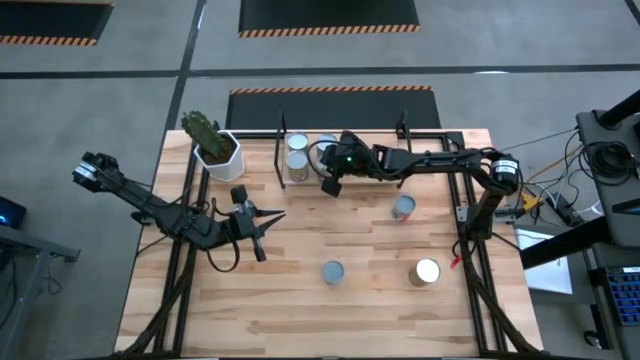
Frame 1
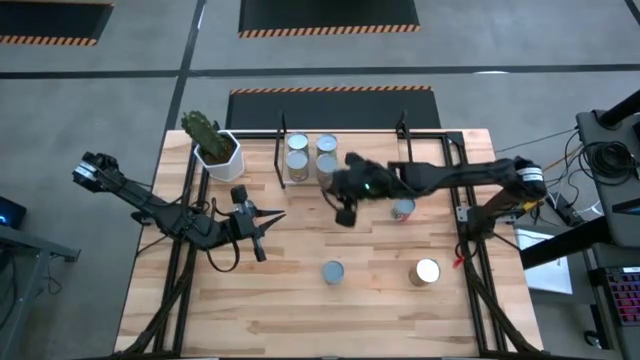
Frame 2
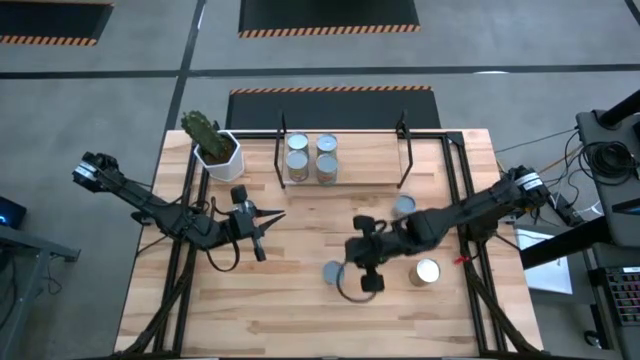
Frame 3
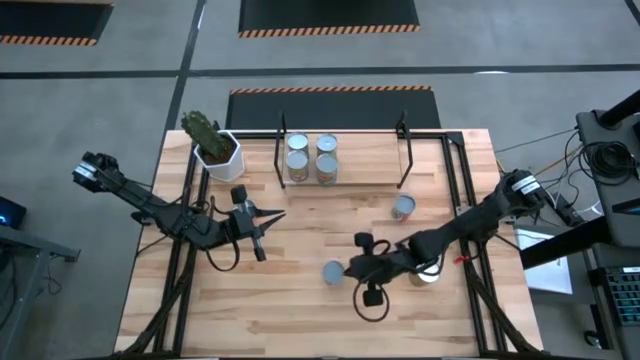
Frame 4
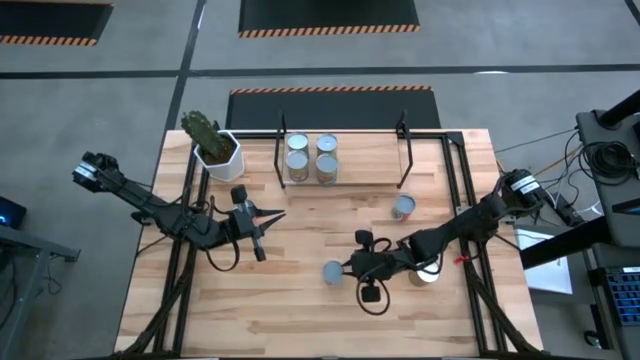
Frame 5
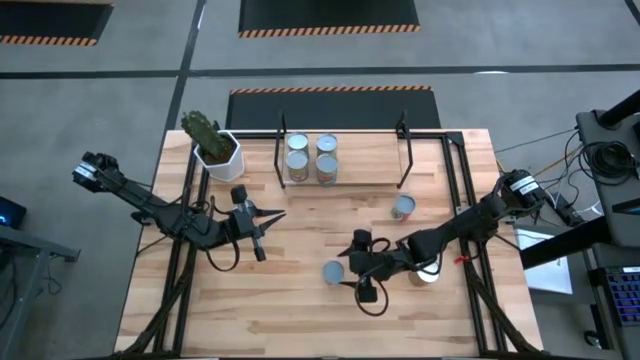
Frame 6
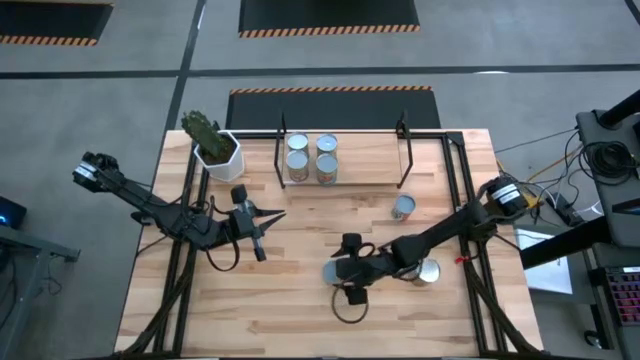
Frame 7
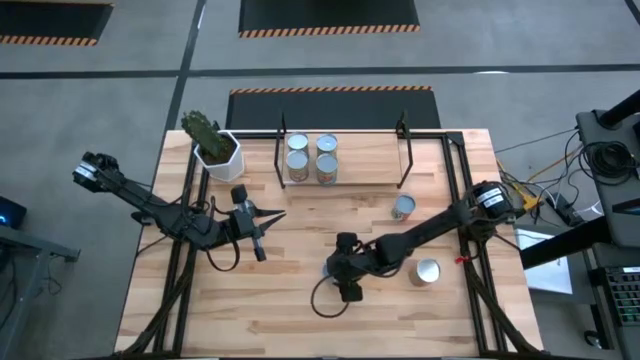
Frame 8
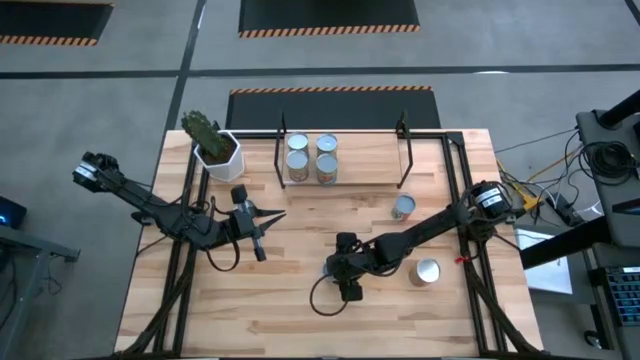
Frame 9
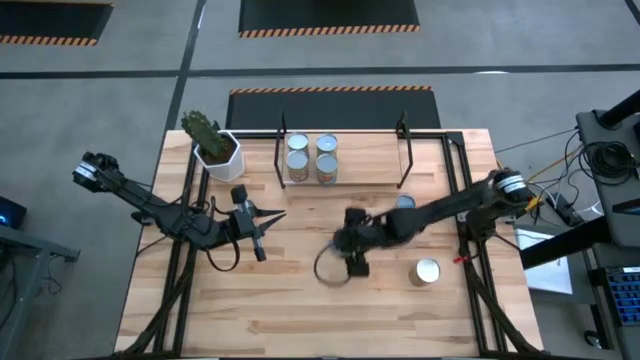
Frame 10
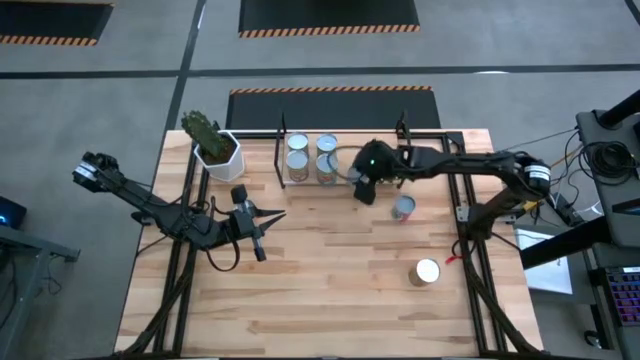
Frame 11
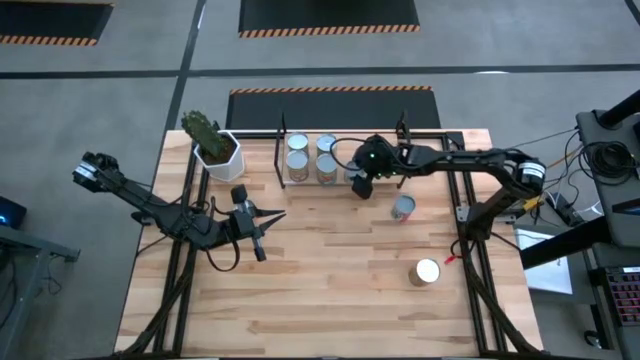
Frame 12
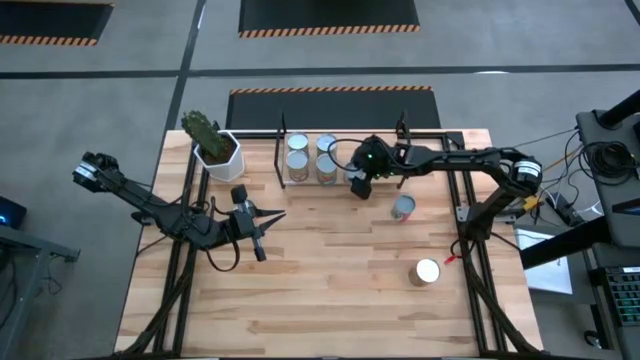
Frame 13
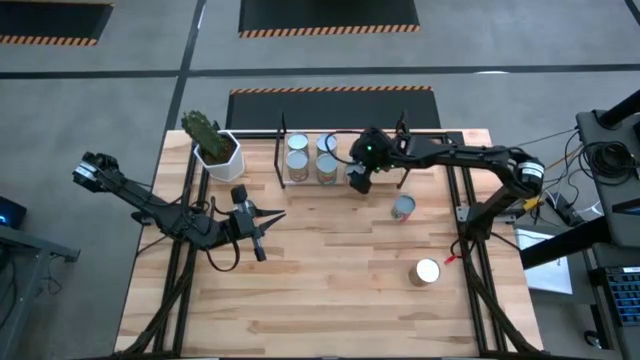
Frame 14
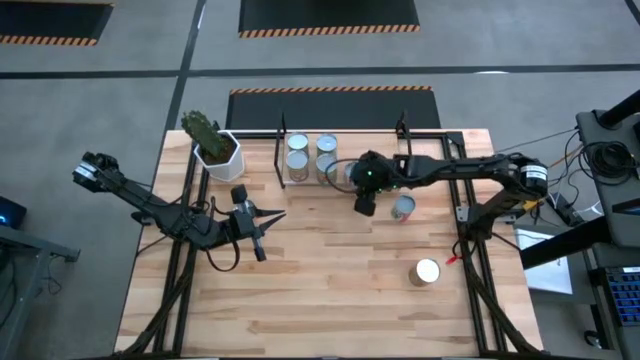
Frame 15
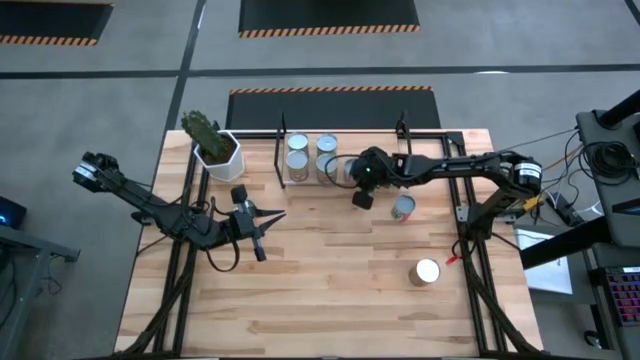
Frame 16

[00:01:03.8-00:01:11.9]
Task: Pick and place cans onto a shelf
Put the canned sliced carrots on the shelf

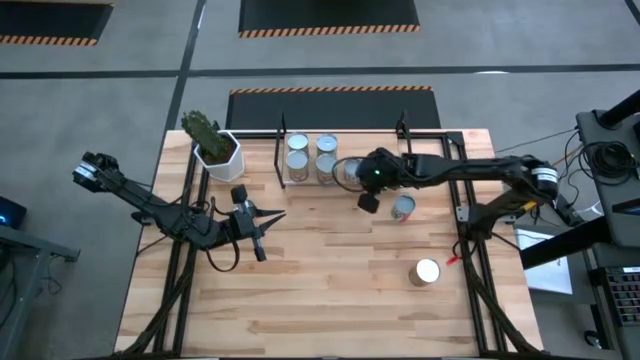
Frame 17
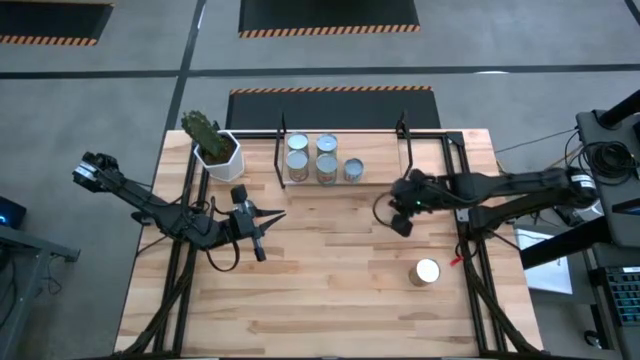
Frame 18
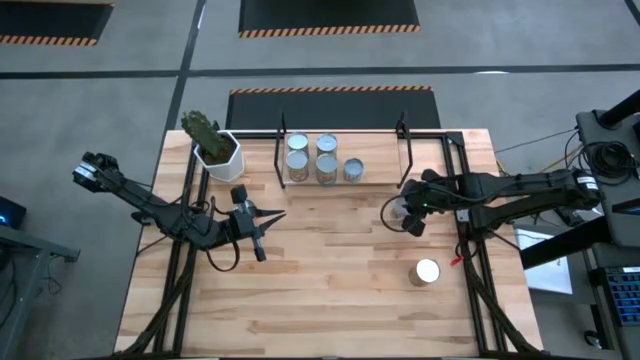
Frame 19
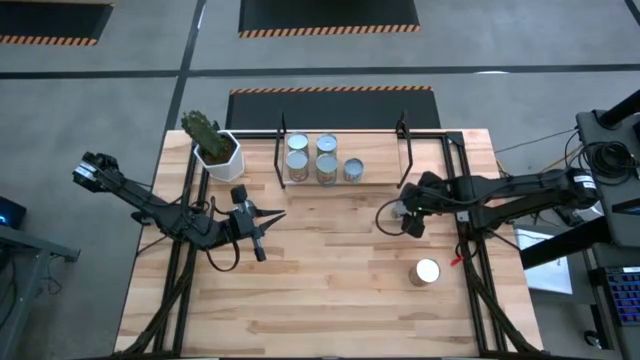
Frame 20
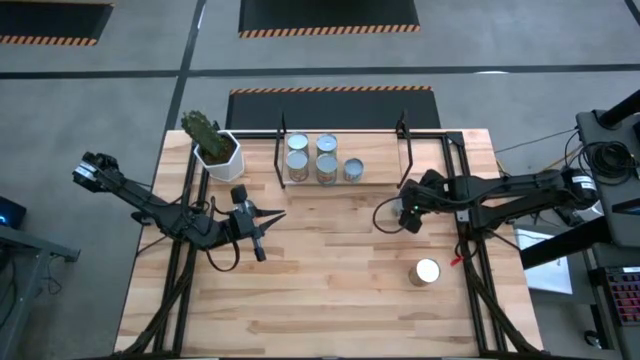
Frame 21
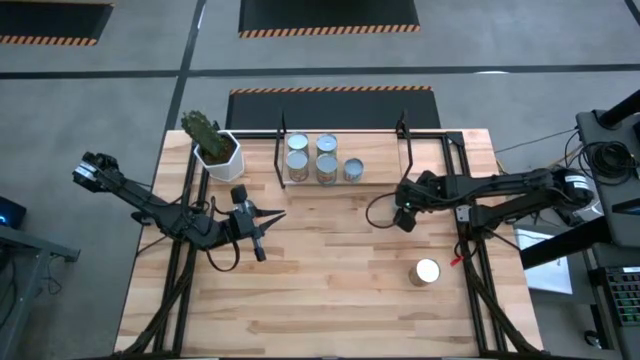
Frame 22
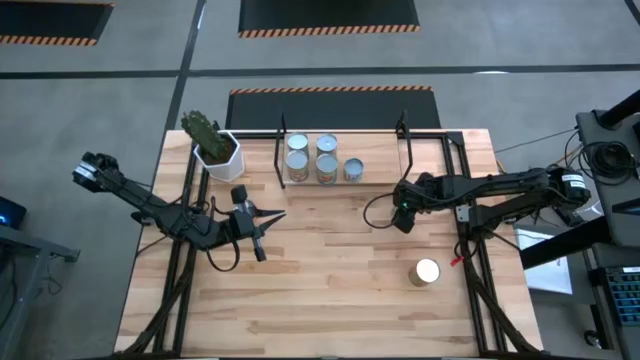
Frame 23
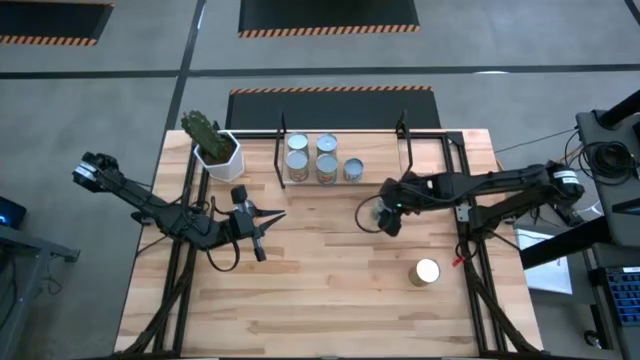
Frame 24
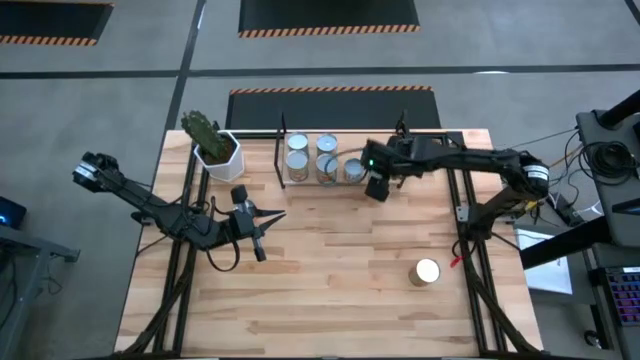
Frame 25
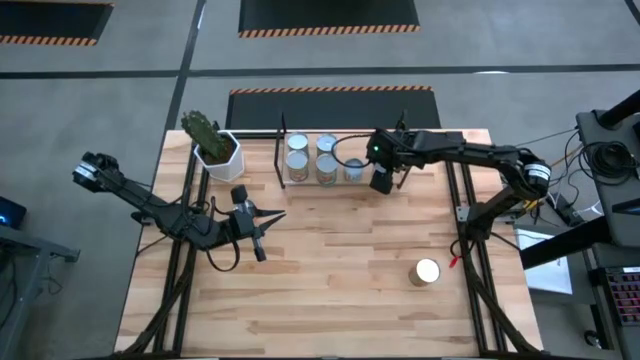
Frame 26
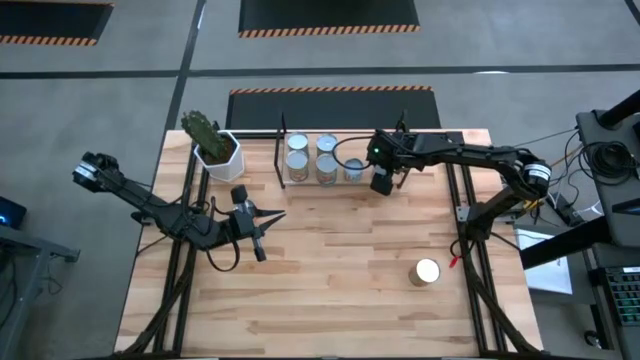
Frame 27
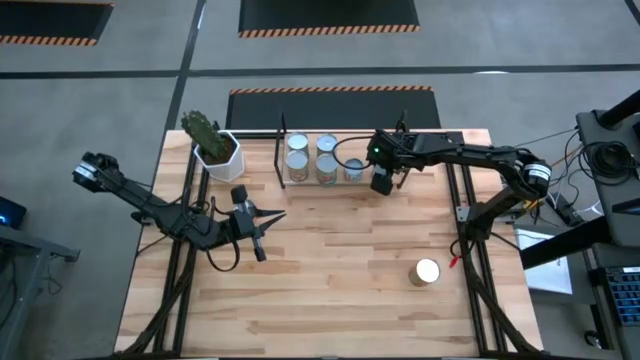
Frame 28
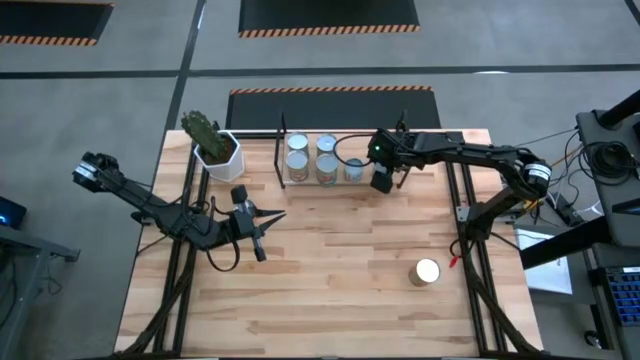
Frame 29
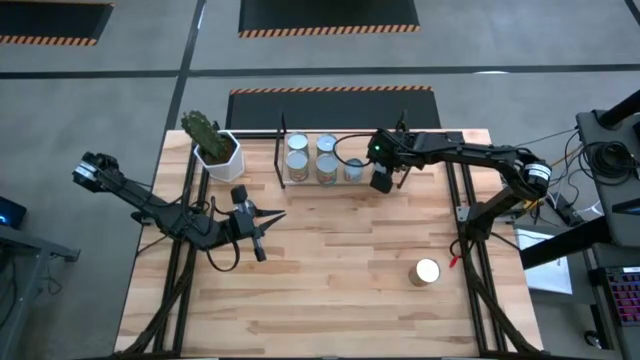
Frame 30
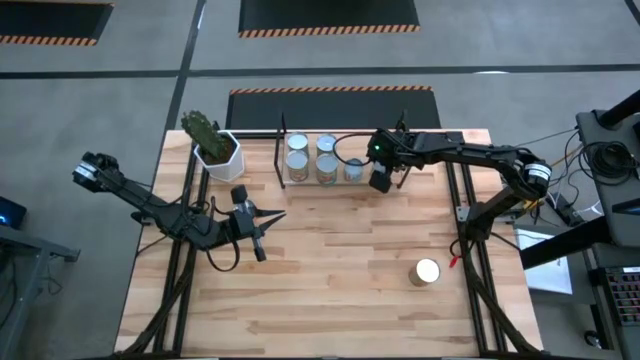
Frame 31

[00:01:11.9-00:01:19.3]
Put the canned mixed fruits on the shelf

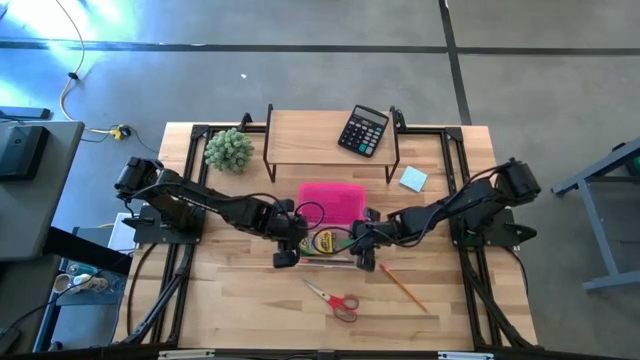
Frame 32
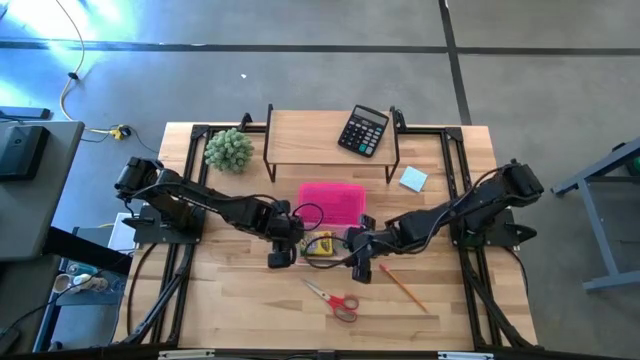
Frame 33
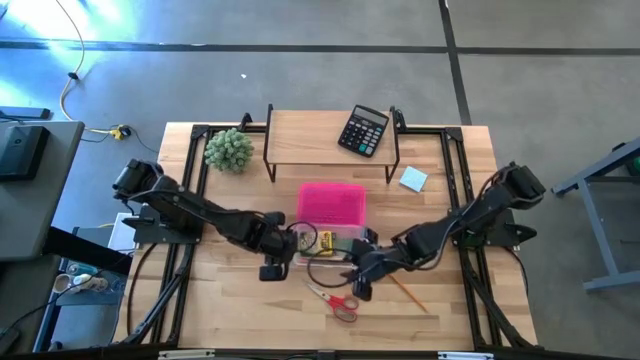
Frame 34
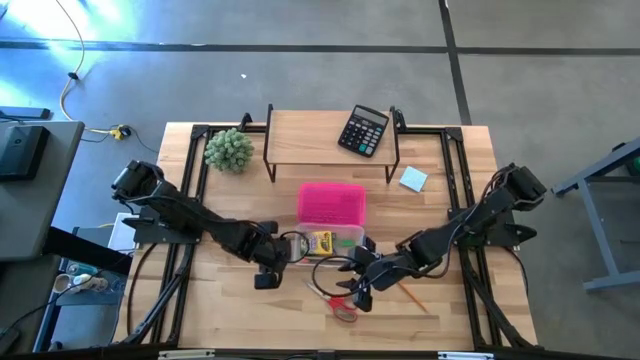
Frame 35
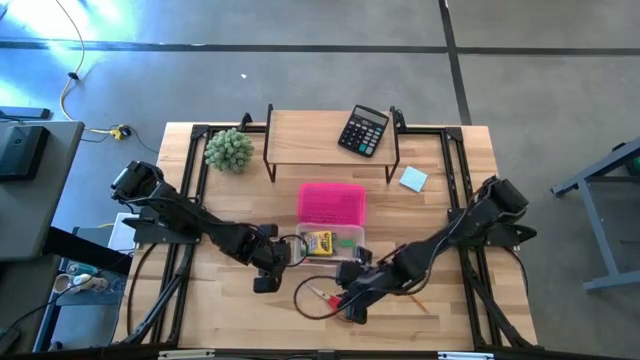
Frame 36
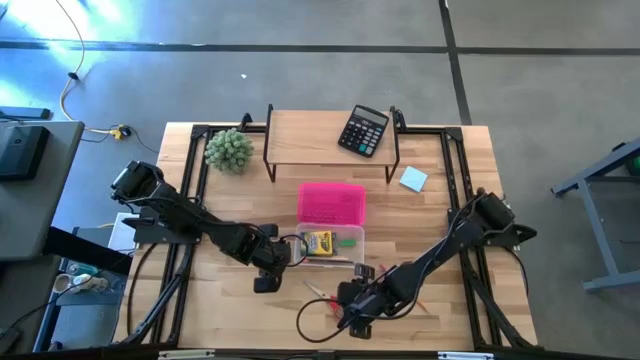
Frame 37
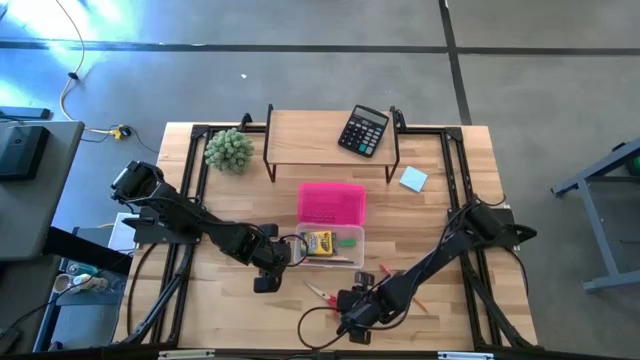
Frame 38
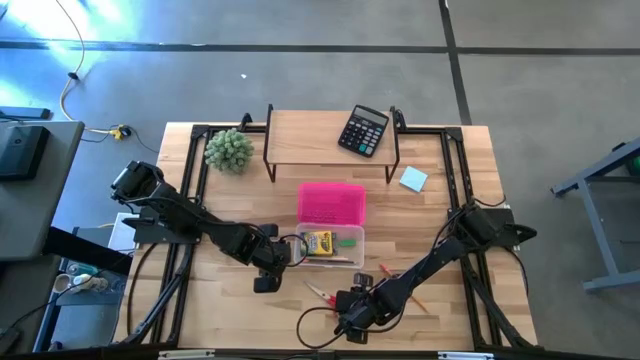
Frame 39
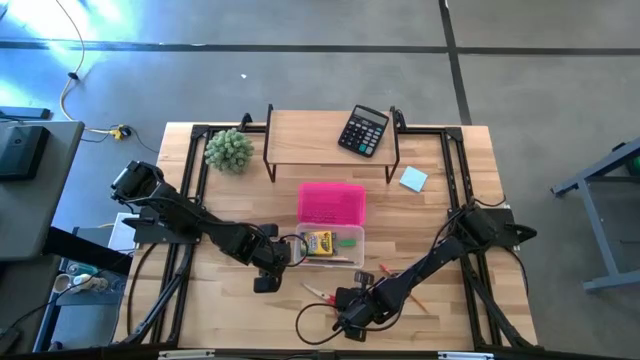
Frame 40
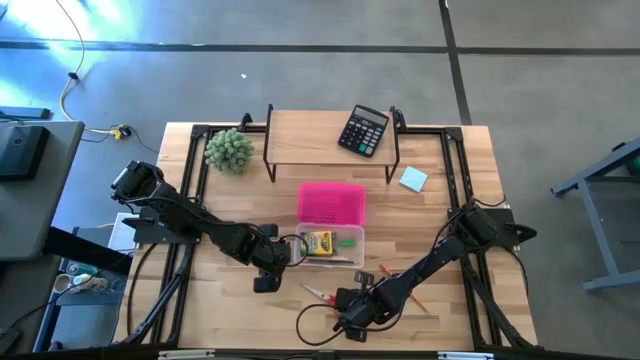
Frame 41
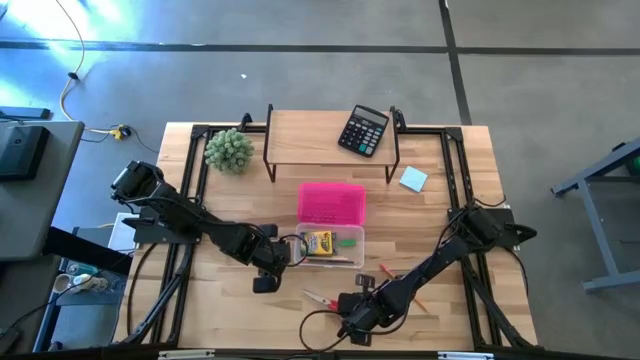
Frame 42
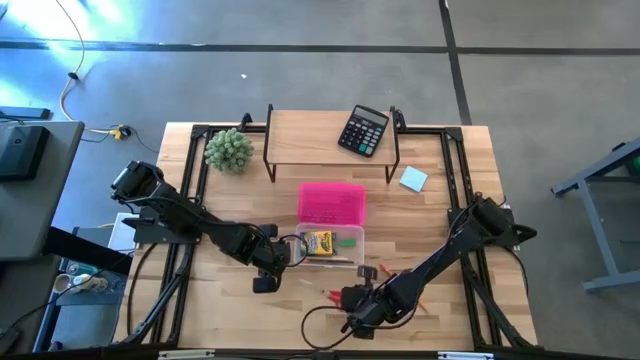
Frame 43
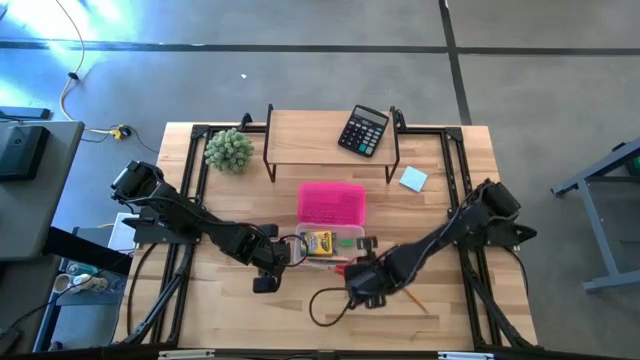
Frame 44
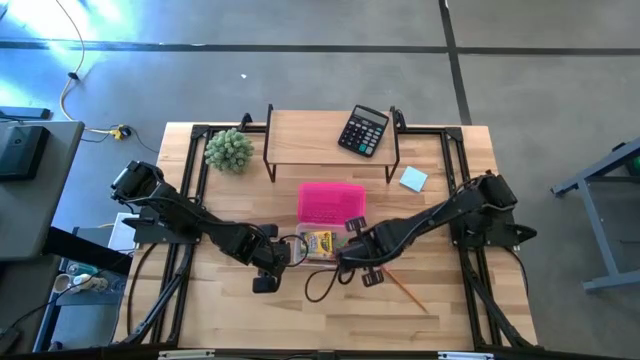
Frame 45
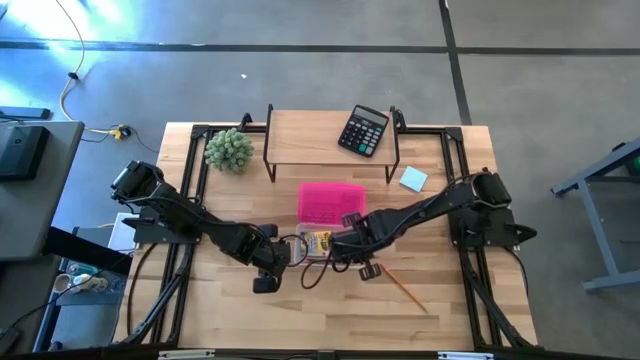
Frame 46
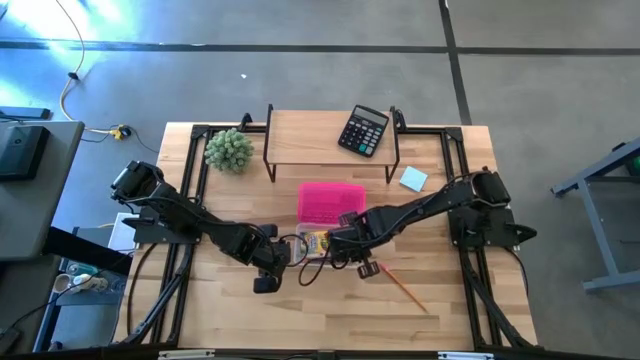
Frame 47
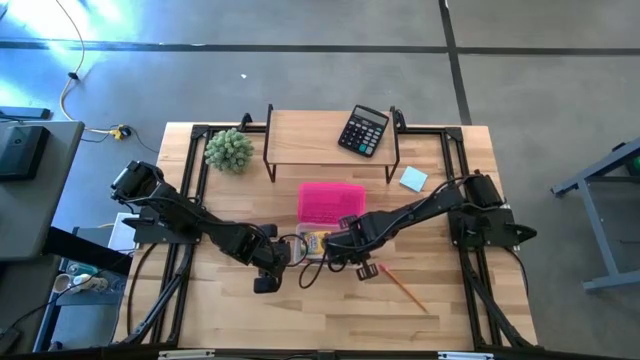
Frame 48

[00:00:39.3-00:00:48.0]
Task: Pack school essentials
Put the red scissors into the pink supply box
